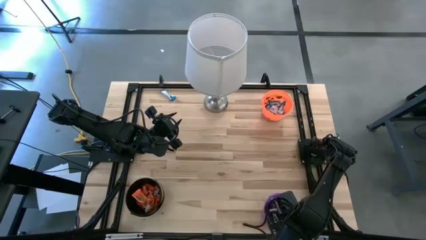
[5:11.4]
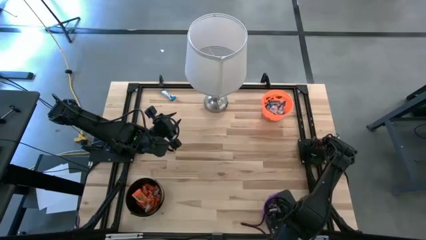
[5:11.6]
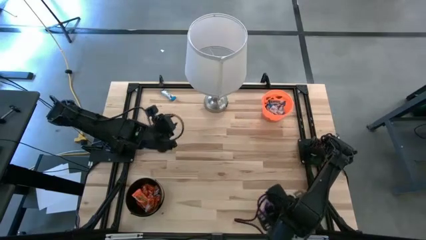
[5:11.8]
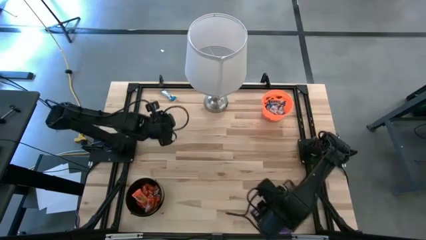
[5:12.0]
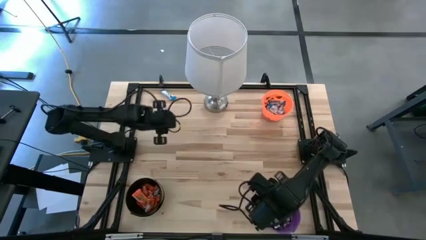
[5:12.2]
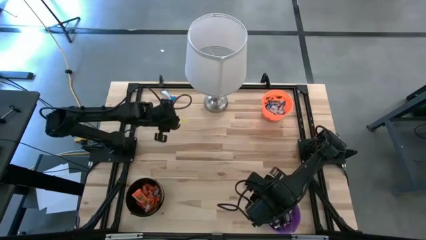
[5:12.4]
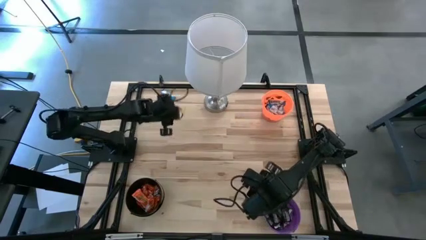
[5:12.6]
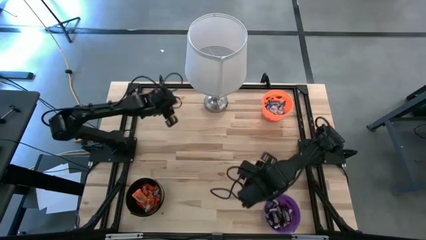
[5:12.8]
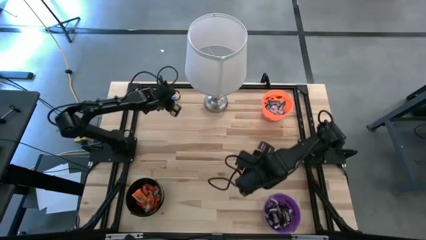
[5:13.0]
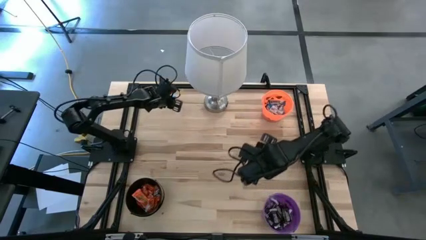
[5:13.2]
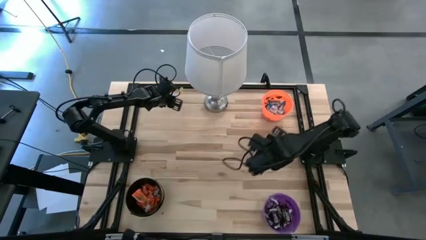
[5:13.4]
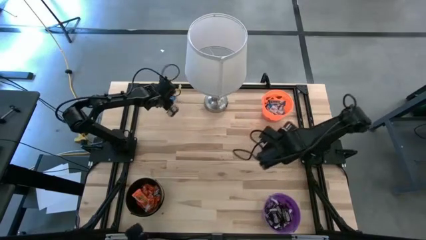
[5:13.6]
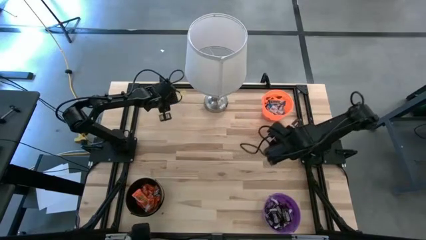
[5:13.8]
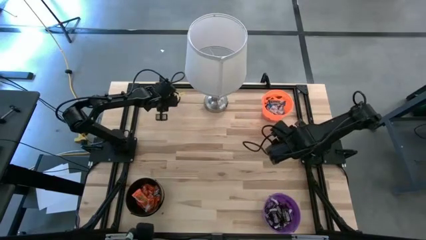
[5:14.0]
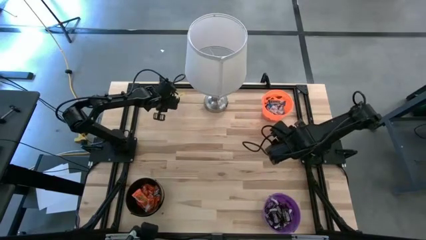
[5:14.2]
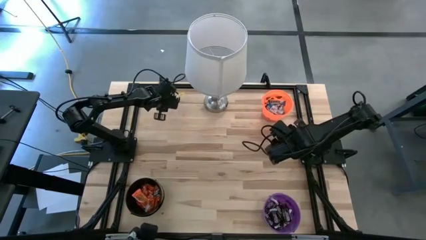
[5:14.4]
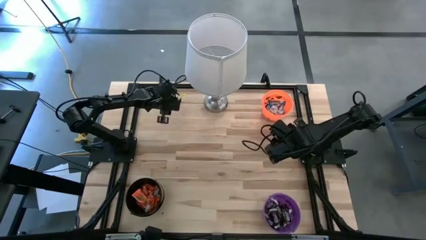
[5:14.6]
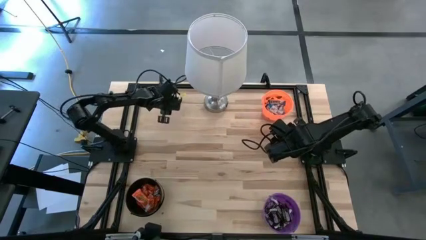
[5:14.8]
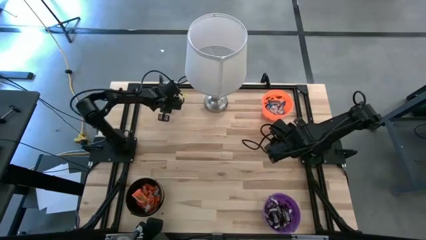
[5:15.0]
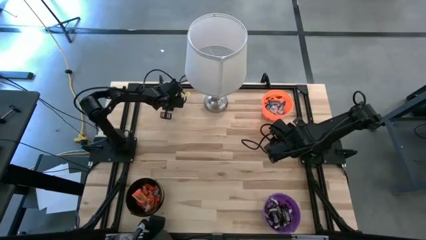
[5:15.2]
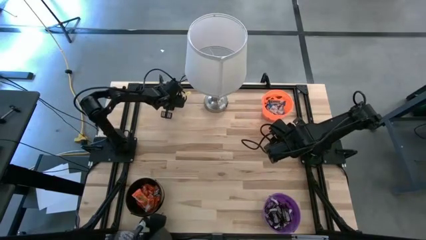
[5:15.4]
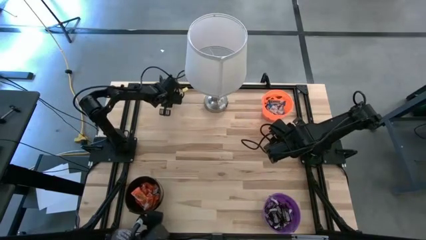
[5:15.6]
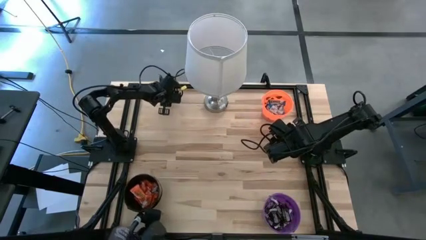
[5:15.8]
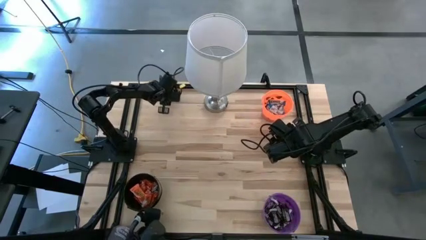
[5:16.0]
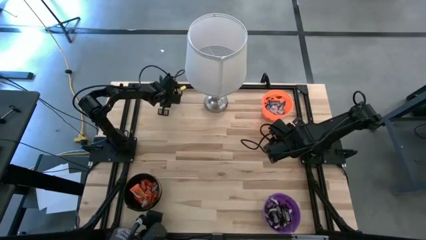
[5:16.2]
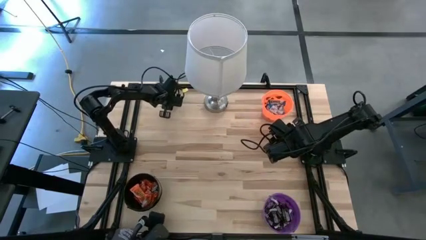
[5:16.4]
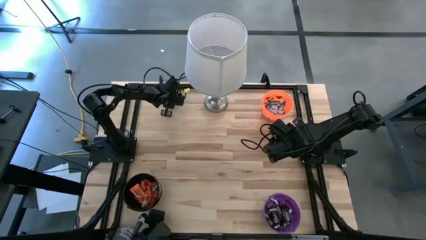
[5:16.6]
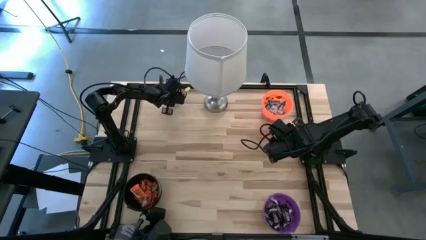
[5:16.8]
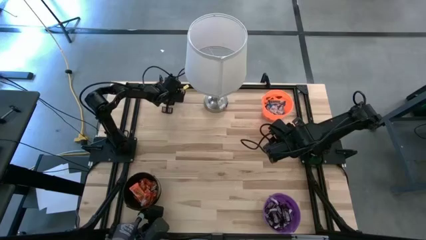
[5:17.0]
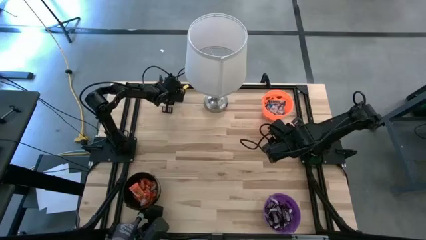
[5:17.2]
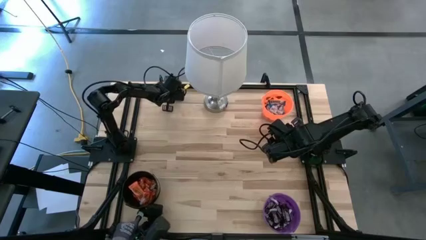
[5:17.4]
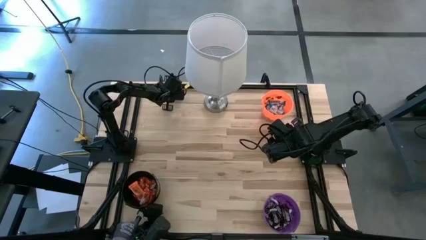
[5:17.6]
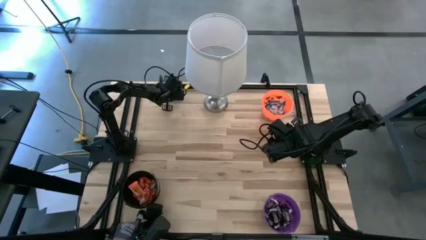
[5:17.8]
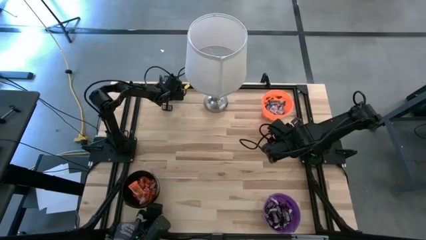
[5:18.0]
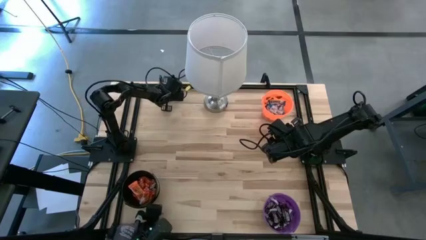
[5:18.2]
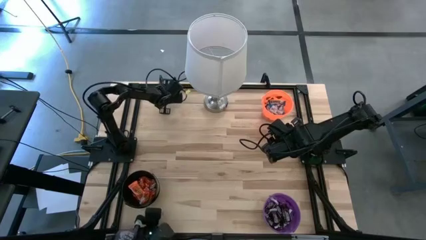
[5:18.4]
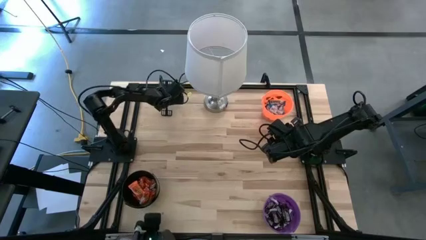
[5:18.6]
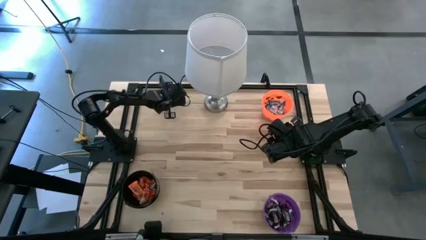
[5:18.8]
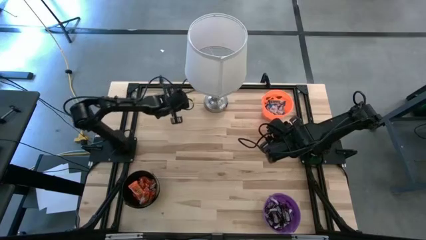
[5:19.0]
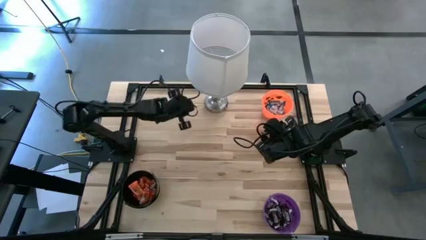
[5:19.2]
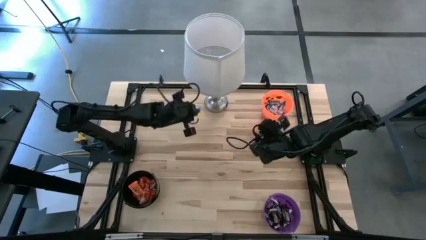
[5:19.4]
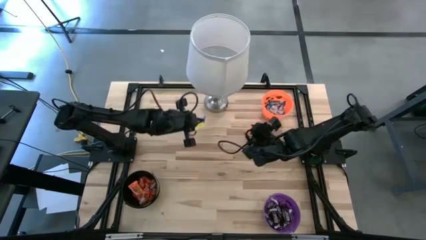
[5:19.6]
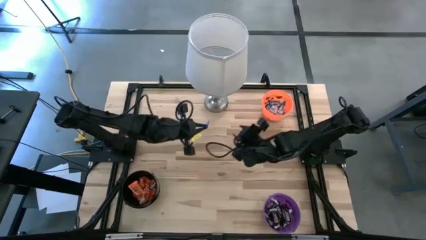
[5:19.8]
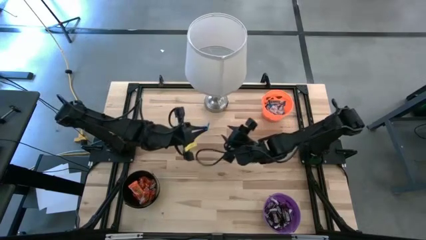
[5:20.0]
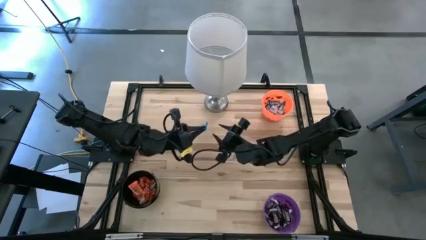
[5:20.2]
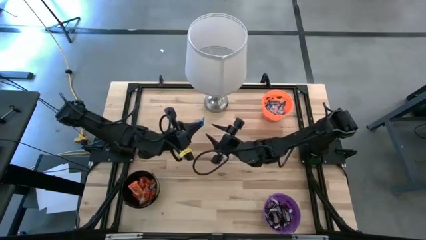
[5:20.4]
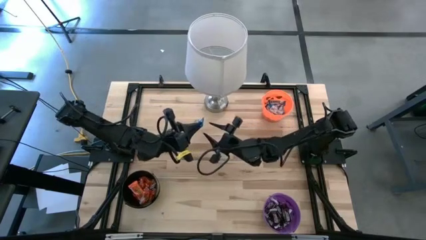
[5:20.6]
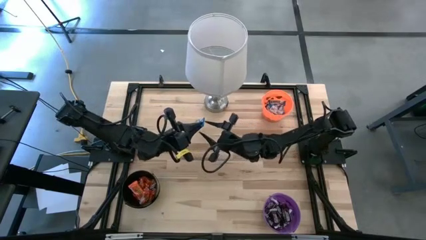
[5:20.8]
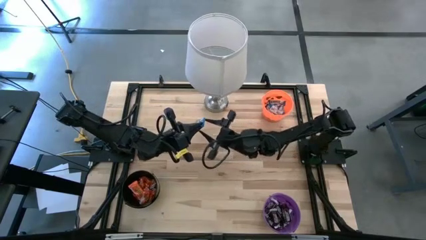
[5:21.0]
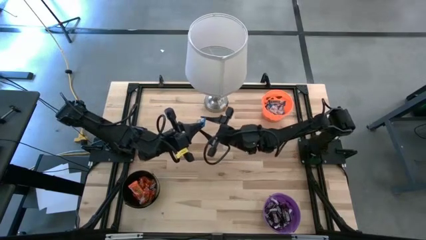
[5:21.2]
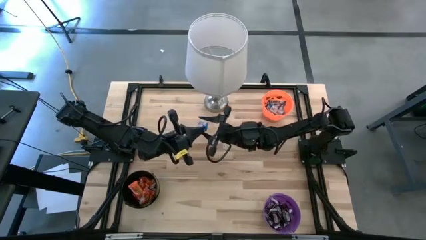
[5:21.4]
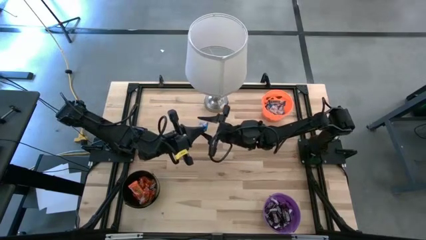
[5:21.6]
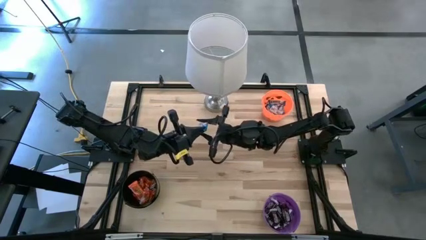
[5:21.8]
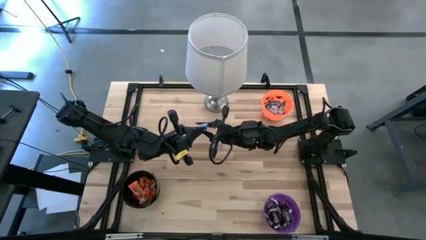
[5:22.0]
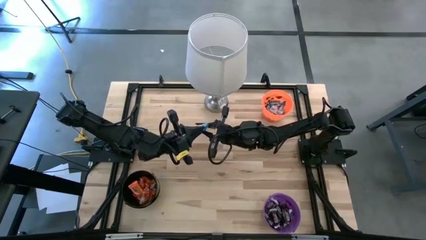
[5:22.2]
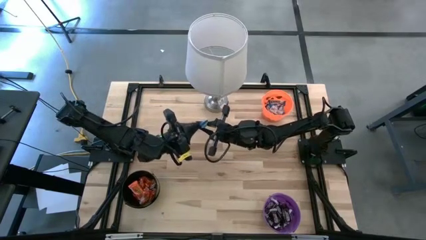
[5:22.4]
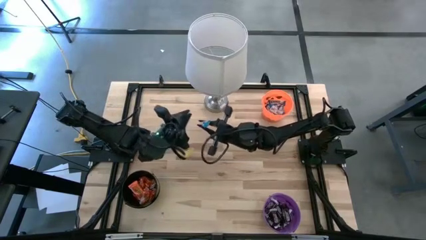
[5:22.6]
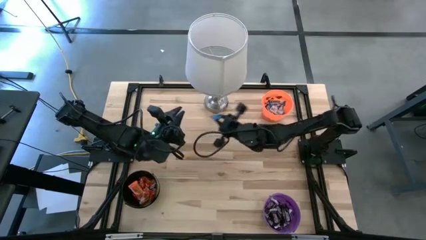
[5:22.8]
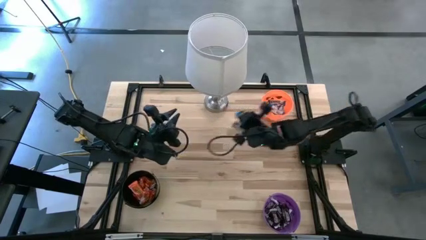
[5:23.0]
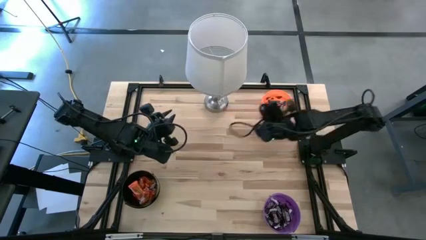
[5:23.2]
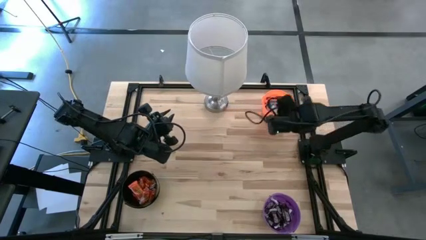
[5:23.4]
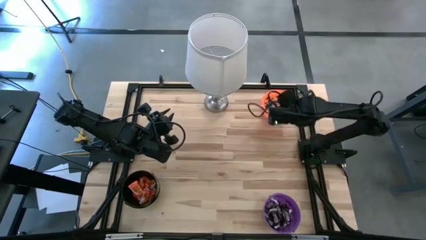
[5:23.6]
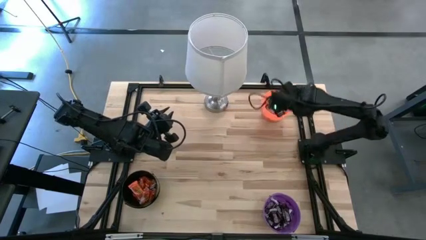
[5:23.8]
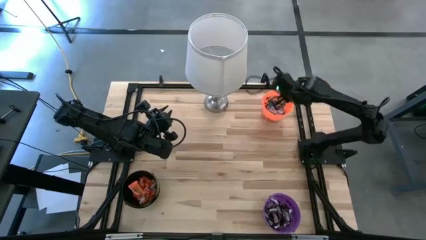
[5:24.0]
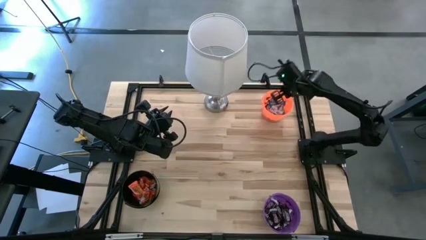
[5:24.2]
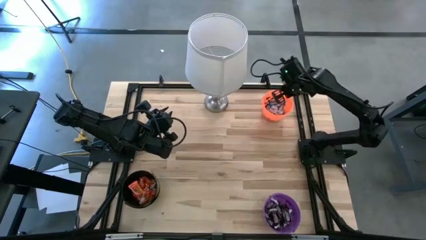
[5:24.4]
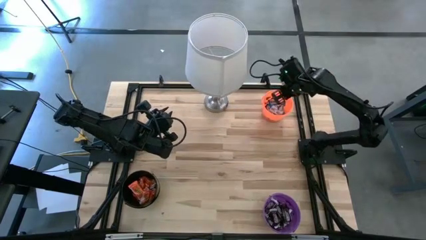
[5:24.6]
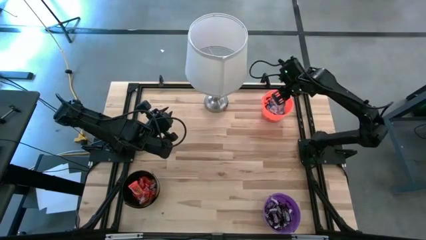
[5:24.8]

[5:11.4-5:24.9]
Task: Sort candy
Put the white chocolate bar into the orange bucket

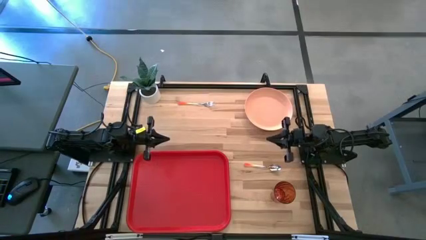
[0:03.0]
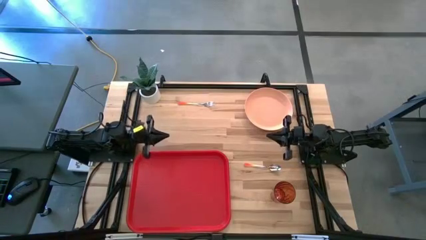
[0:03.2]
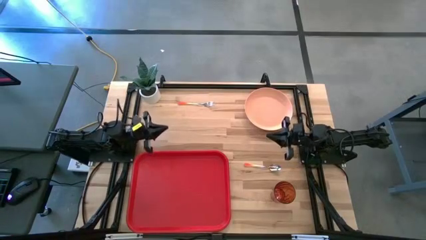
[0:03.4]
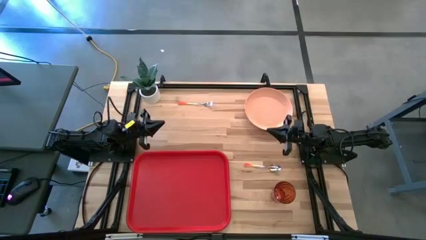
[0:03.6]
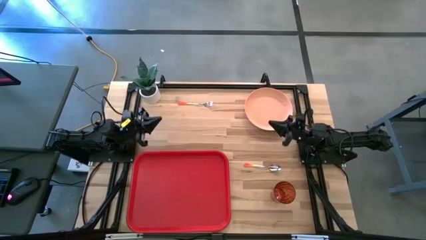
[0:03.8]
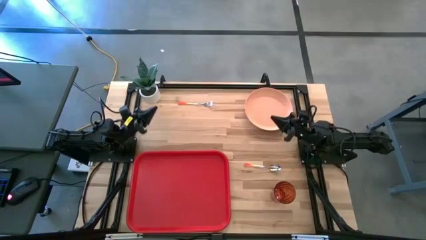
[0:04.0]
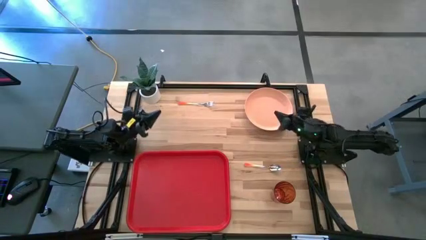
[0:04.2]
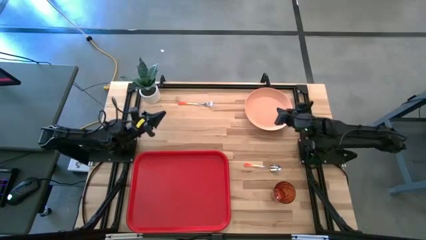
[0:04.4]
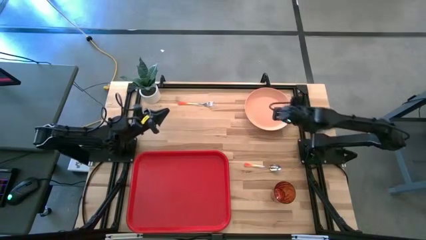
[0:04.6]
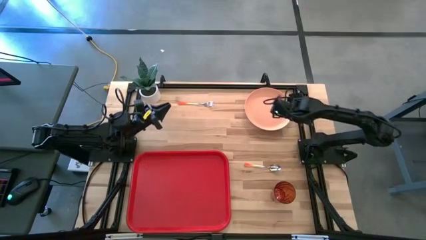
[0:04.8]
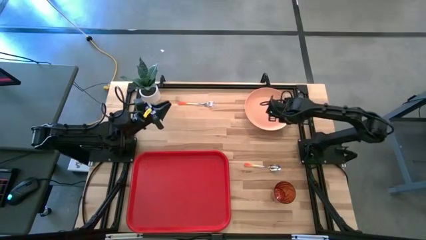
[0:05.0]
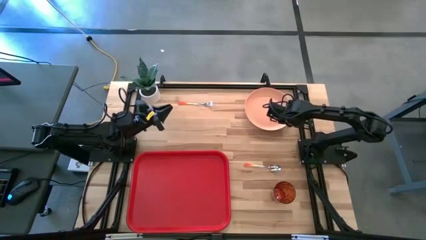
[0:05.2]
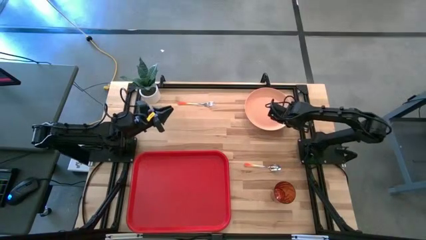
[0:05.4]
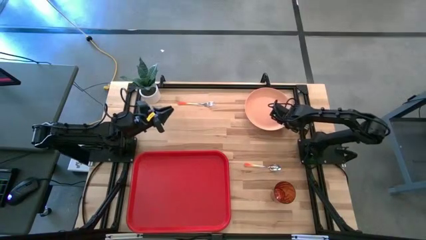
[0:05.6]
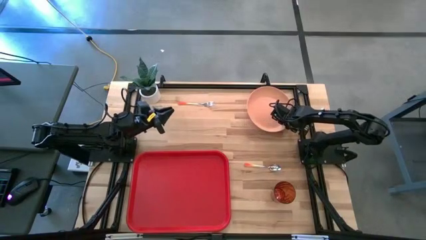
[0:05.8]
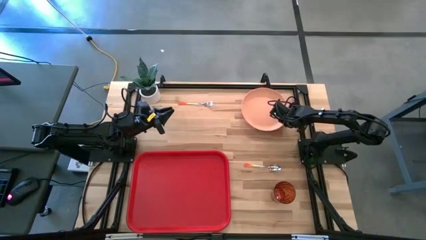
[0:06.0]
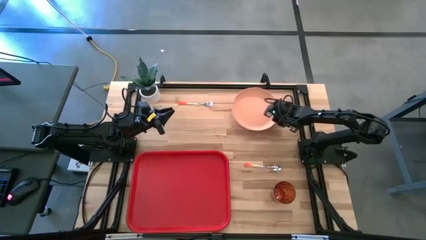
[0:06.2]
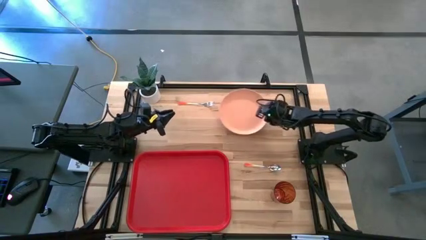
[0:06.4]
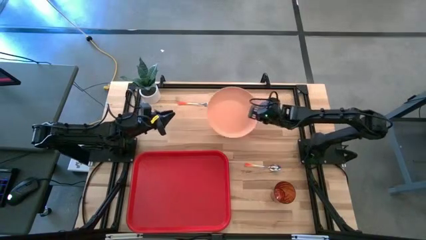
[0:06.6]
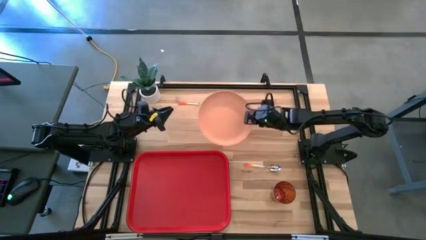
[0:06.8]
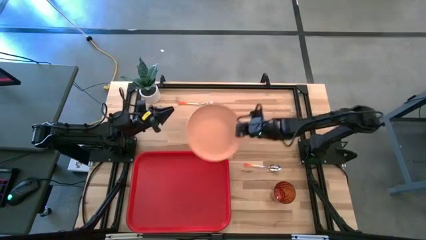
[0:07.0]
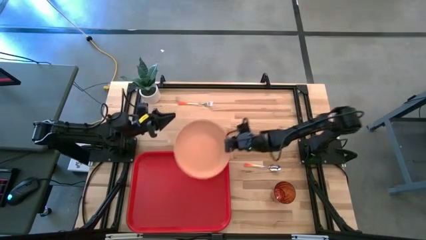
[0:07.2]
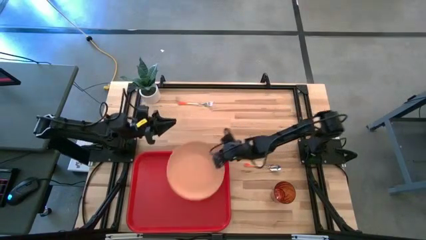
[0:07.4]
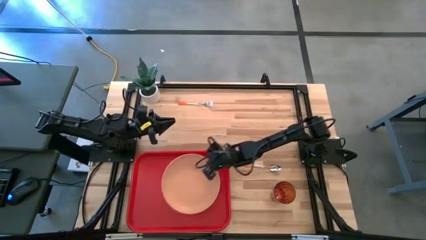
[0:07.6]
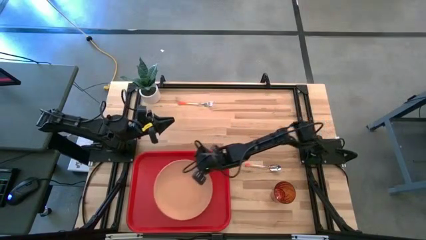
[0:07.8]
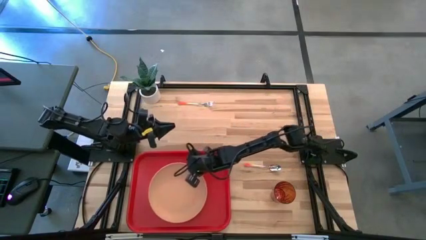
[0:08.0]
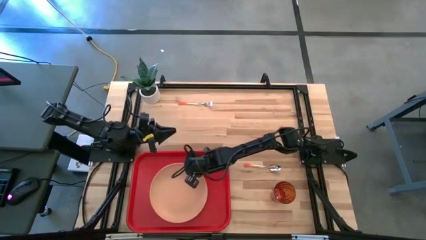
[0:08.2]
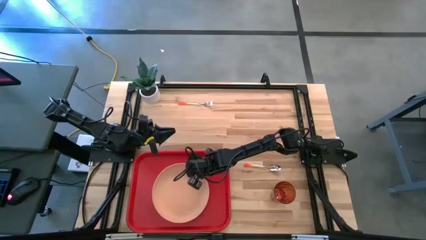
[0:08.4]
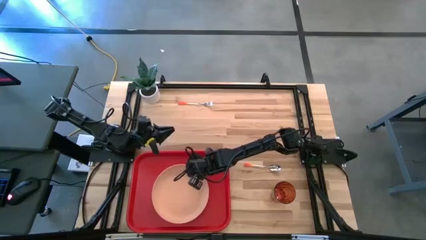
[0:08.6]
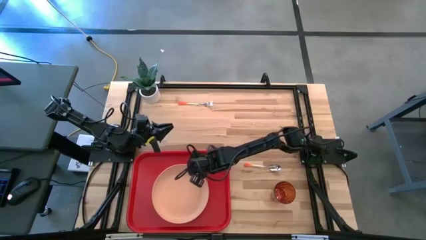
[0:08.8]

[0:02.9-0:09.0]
Task: Pick and place plate/cup/fork/spoon on tray
Put the pink plate on the red tray
